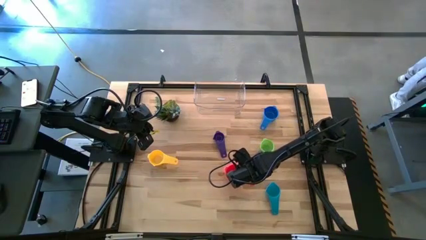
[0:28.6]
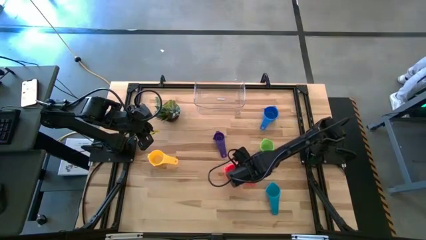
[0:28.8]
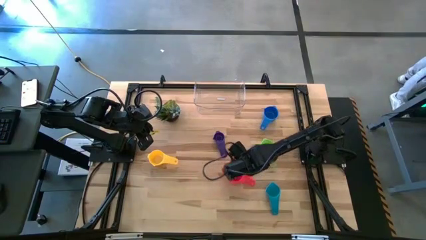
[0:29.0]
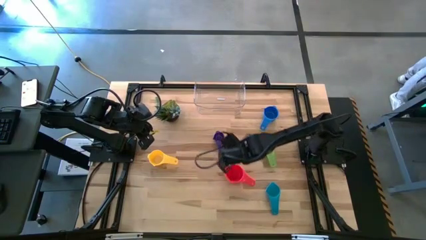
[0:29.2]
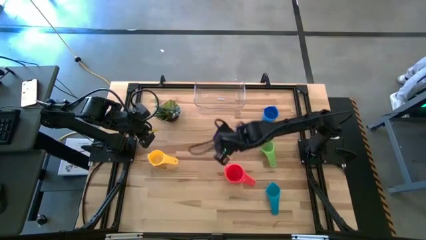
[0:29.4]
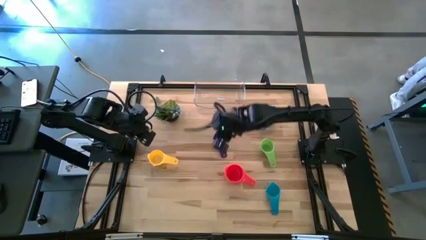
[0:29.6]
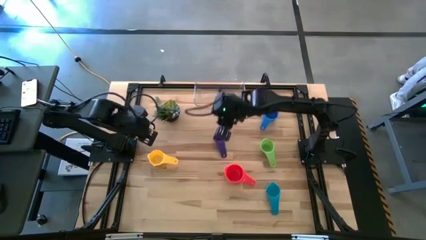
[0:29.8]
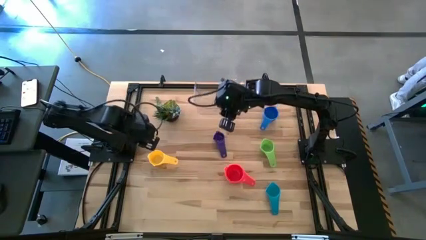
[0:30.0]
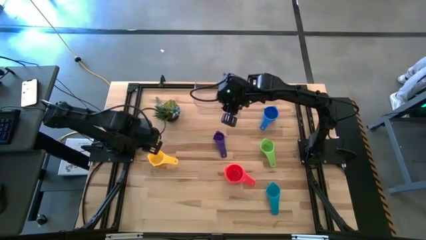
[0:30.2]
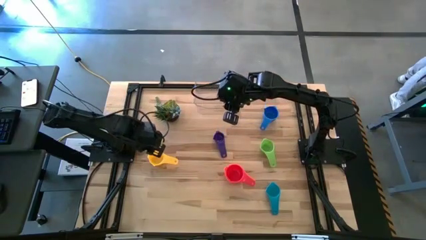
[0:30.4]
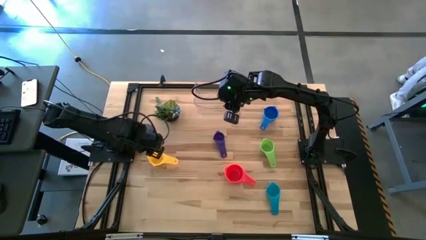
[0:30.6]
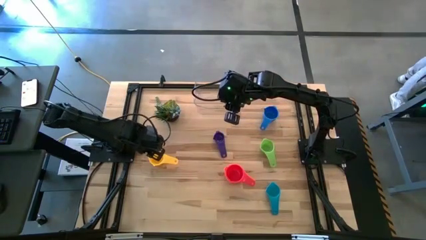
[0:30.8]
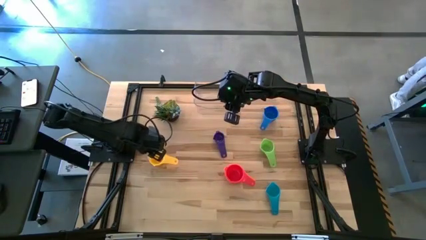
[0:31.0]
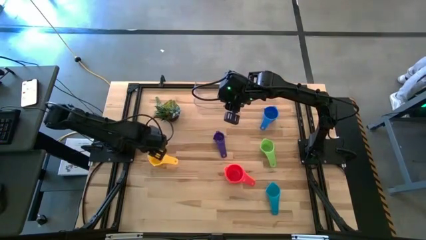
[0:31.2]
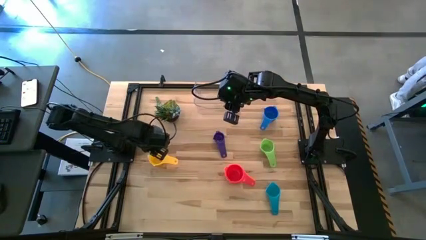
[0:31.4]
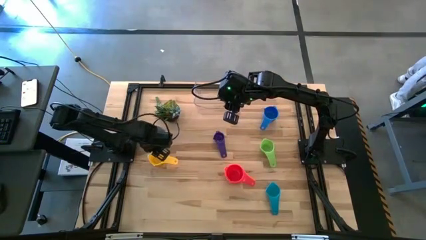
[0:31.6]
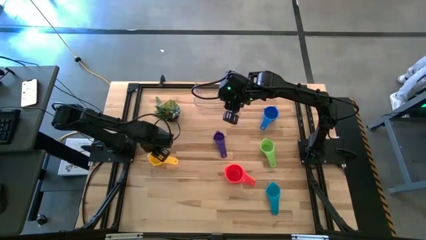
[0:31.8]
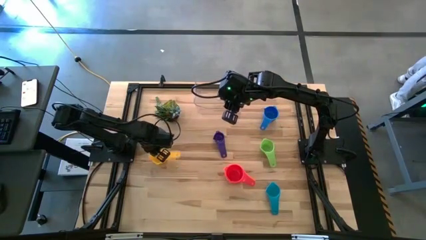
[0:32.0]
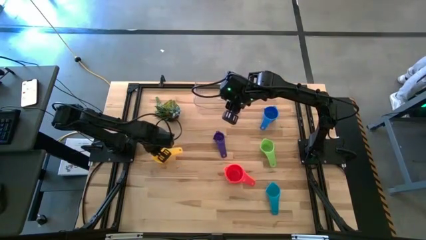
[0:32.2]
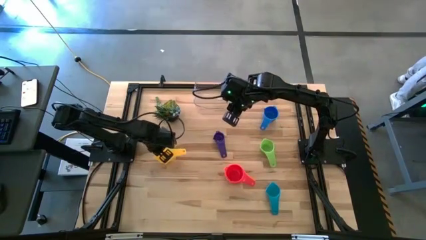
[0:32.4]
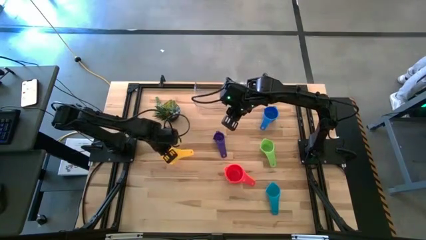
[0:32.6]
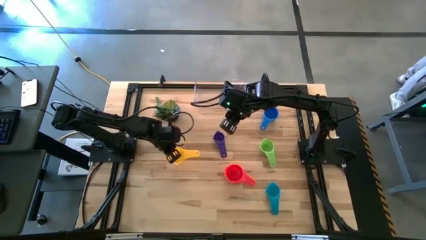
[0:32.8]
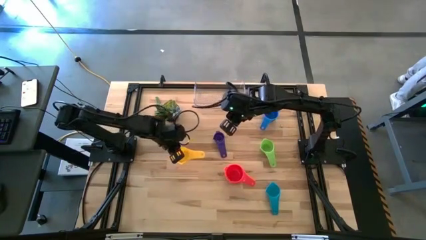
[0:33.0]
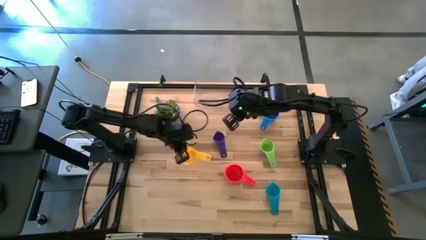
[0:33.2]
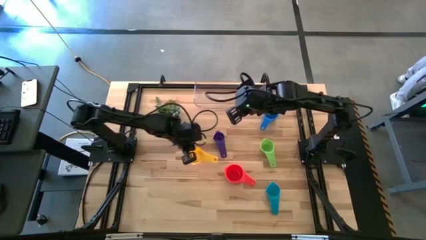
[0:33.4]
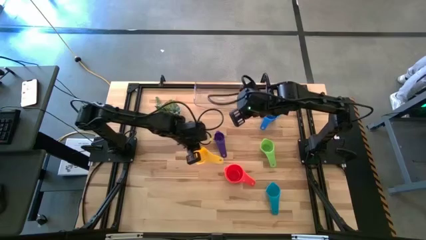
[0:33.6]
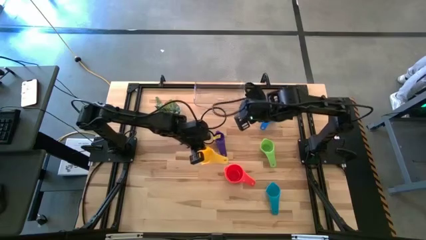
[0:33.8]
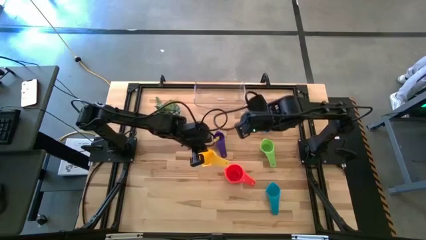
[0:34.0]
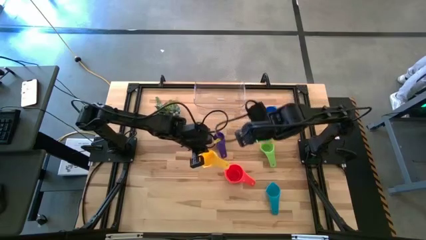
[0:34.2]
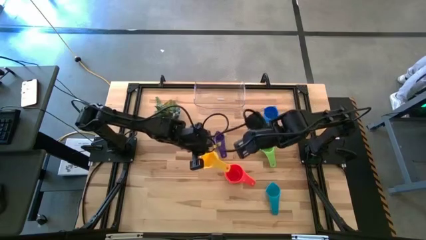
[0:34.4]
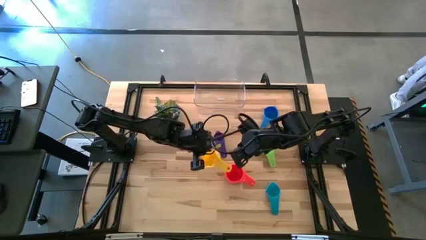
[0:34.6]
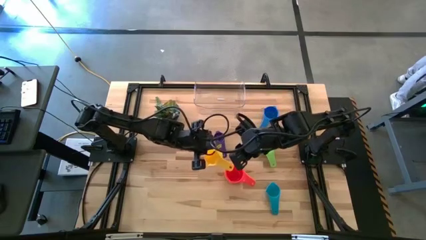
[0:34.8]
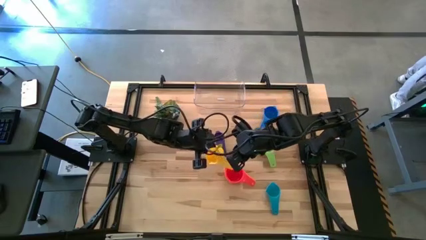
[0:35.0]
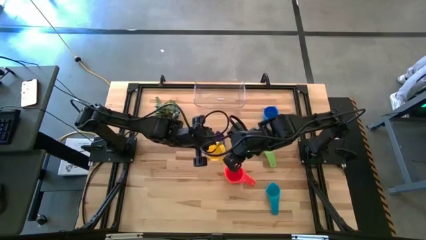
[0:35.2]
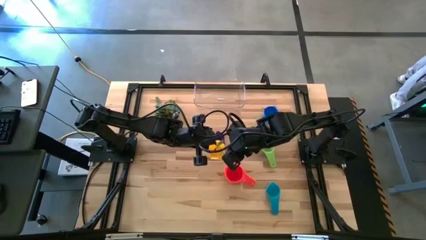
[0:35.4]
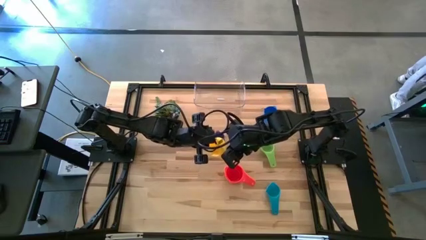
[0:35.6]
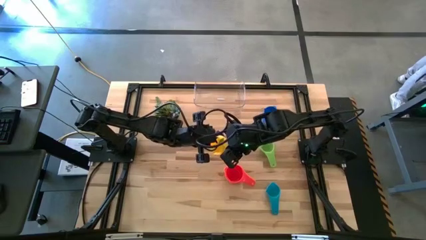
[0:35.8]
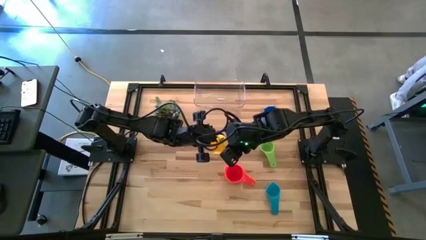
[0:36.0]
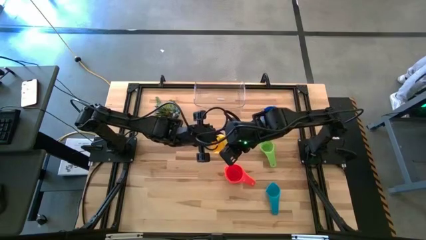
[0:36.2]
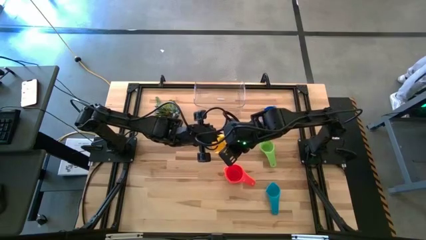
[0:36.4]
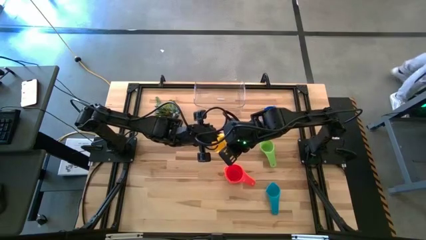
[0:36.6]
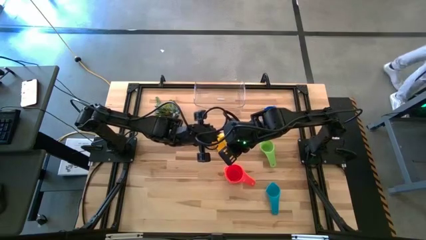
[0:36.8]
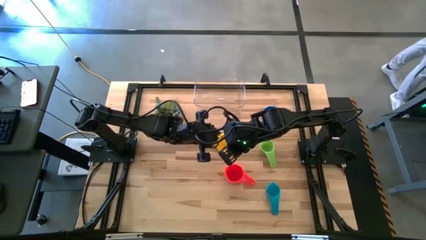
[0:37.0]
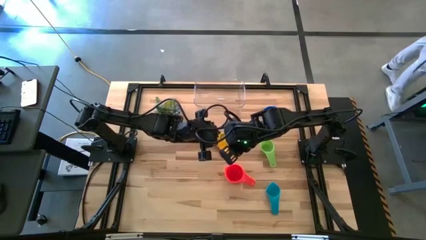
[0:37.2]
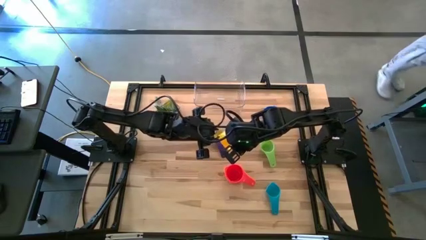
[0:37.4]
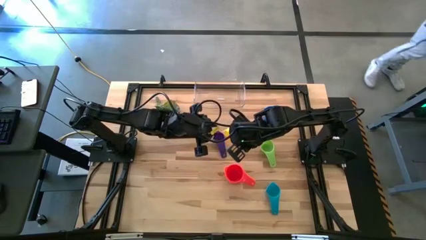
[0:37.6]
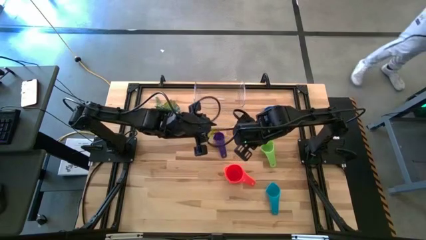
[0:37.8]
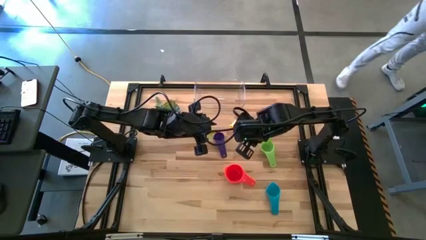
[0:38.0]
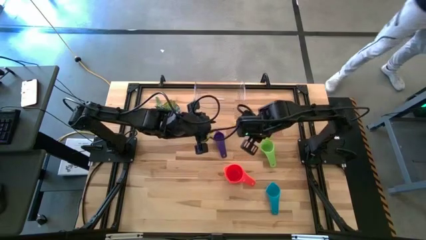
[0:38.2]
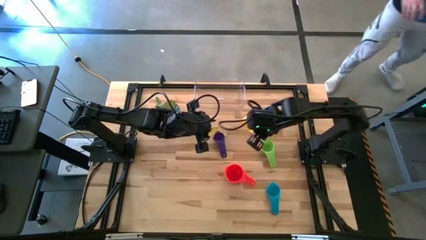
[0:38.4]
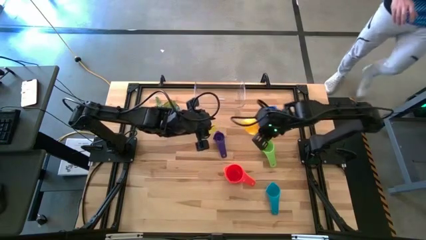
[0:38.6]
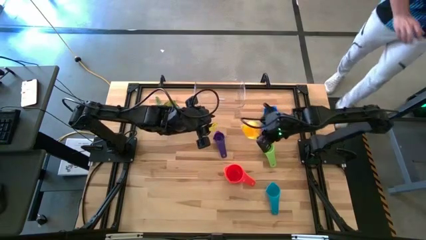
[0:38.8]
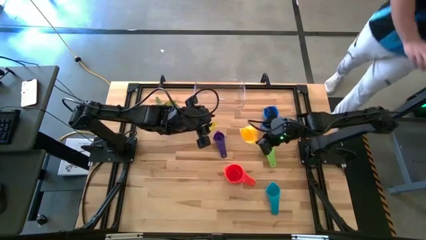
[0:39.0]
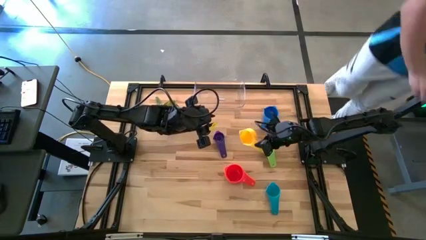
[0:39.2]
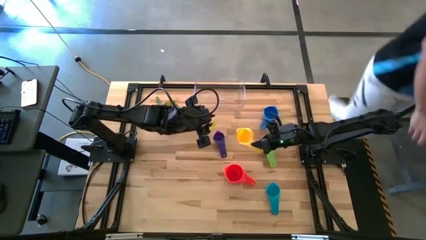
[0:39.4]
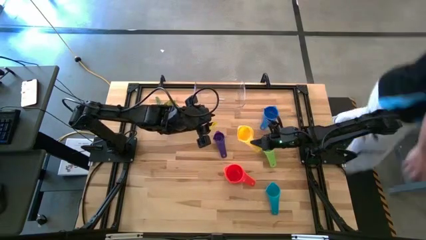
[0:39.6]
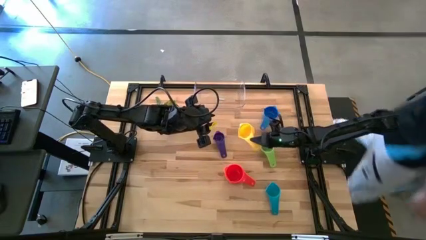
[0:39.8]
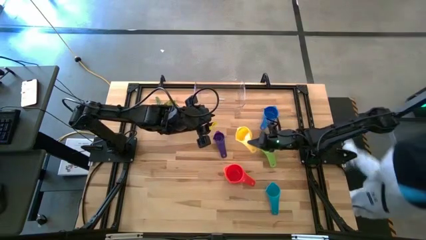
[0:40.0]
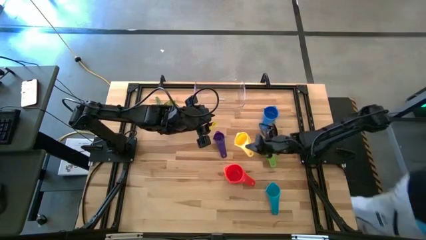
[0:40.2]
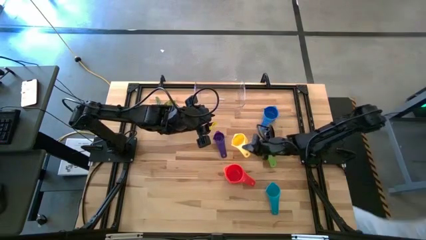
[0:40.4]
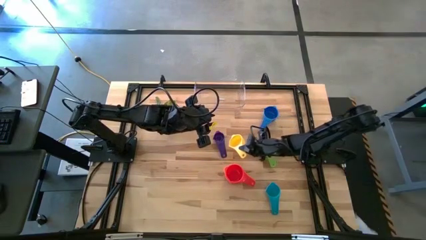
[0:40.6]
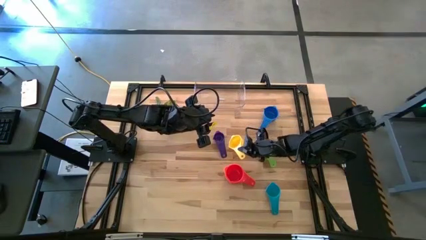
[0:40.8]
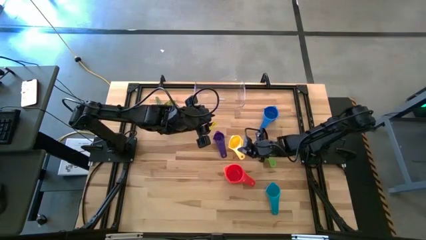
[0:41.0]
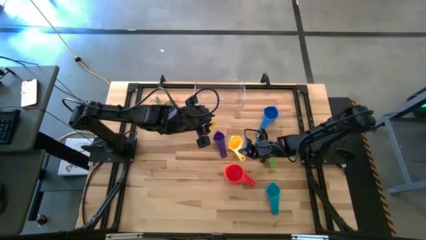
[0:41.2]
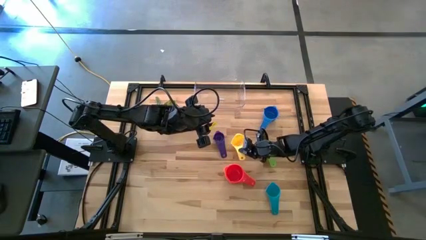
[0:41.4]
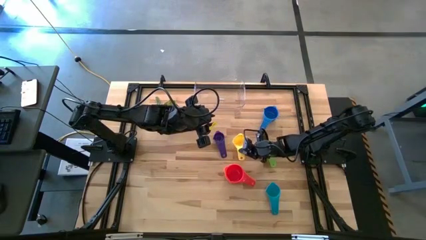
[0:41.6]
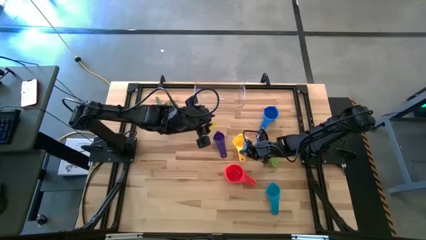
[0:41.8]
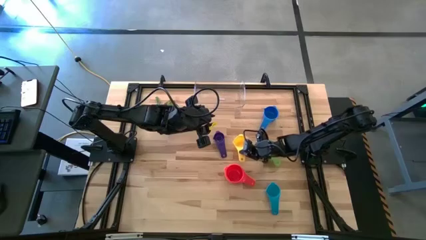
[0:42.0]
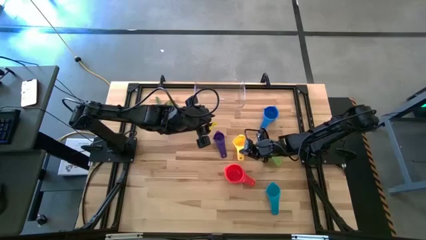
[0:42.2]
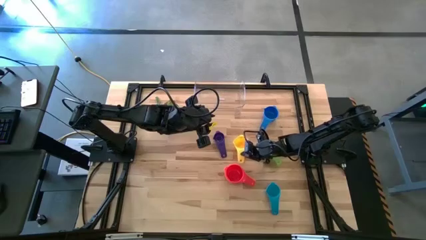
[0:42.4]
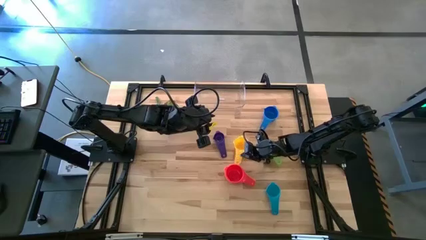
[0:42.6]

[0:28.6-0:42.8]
Task: Nest measuring cups in basket
Move the yellow measuring cup to the center of the table

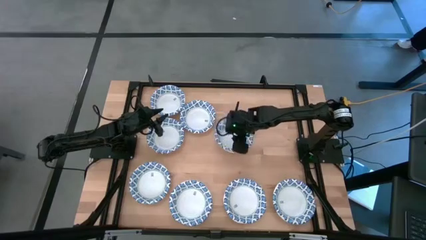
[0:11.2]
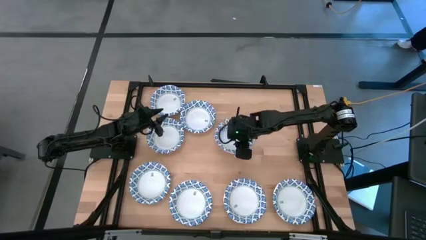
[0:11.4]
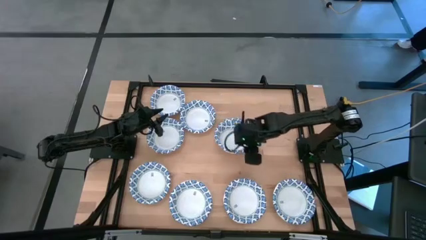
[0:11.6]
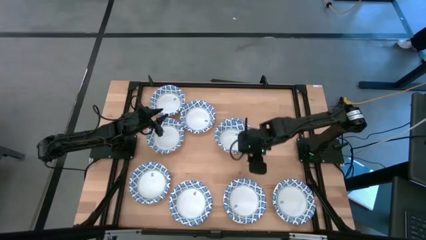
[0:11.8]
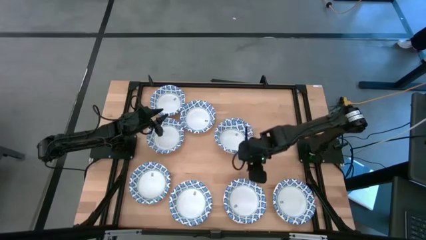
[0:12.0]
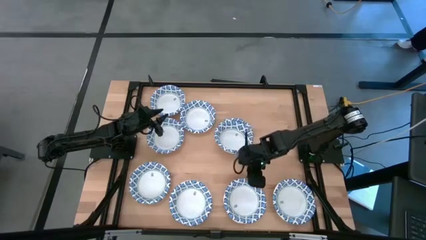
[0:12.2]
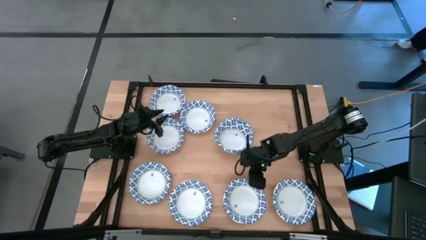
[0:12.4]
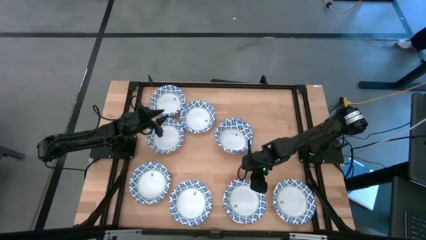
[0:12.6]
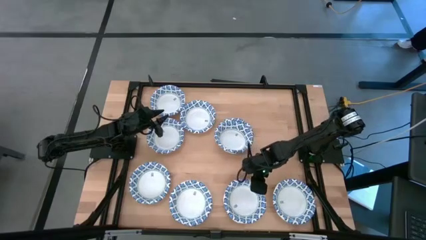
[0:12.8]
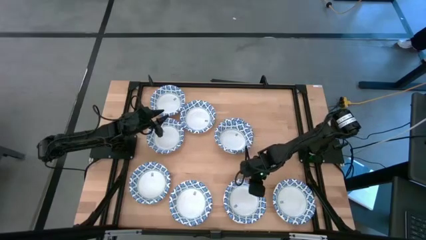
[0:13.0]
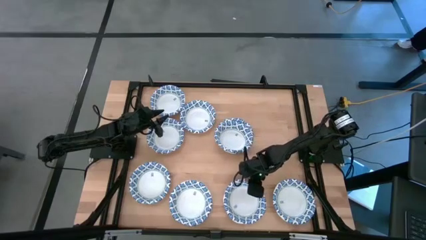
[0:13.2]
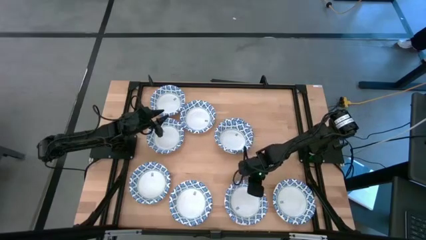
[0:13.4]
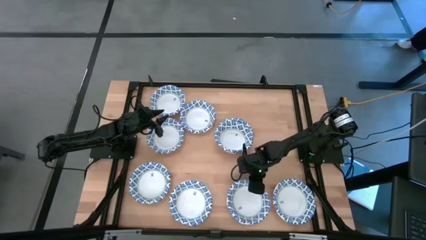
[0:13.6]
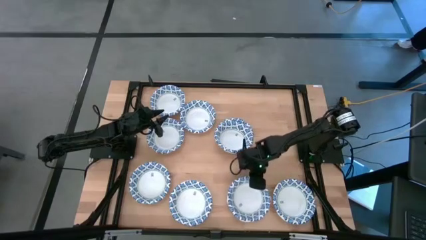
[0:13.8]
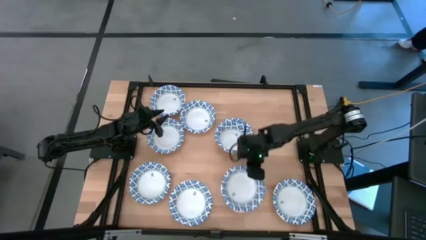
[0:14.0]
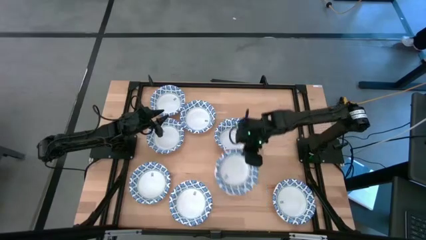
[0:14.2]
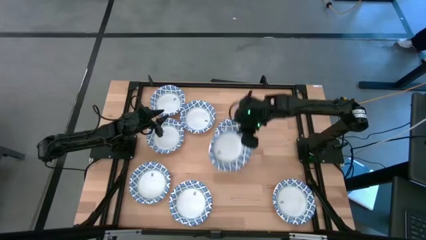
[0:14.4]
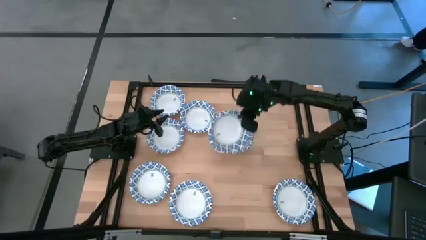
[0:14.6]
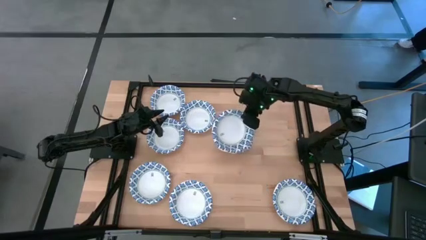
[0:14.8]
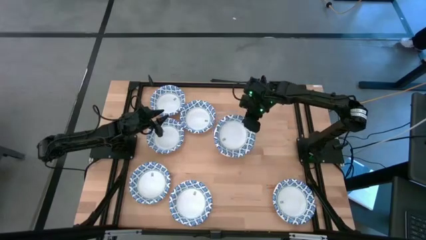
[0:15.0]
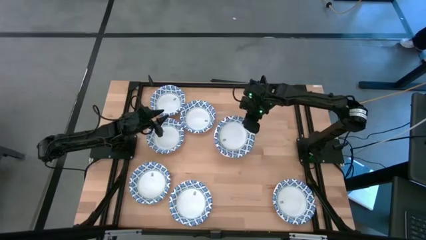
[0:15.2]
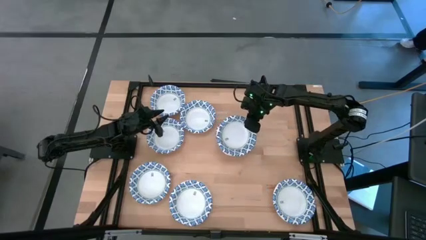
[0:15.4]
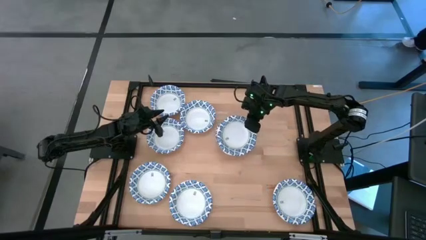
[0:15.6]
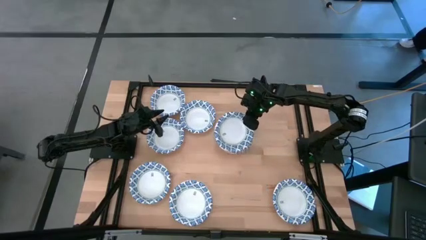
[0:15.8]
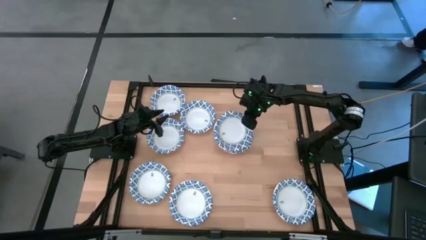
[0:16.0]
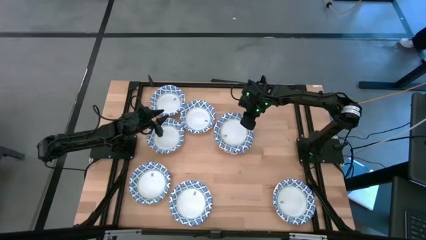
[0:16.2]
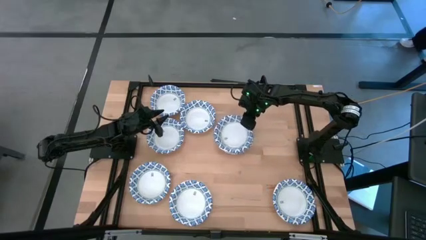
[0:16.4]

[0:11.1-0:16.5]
Task: Nest bowls inside each other
Stack the blue patterned bowl on top of the other blue patterned bowl
